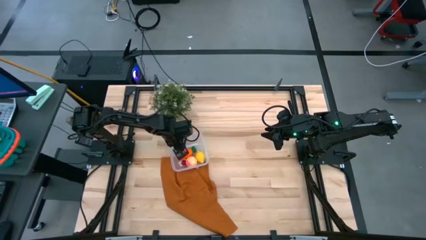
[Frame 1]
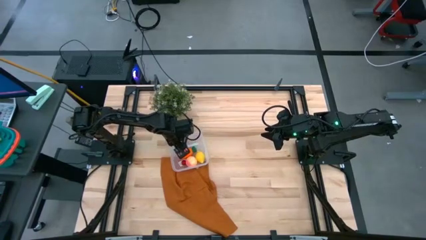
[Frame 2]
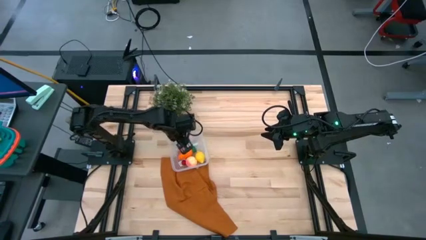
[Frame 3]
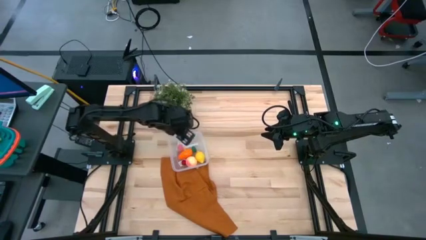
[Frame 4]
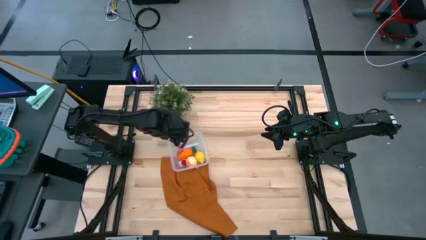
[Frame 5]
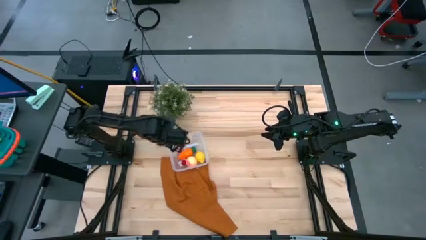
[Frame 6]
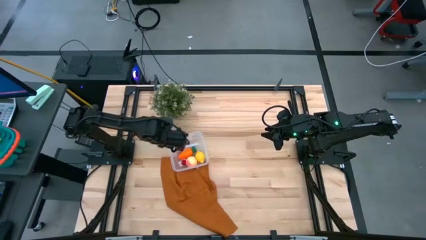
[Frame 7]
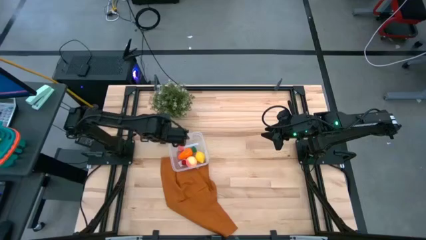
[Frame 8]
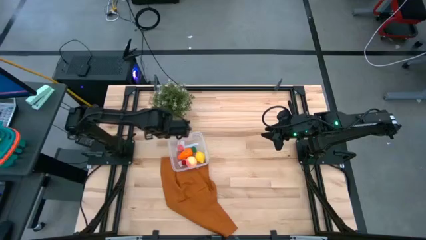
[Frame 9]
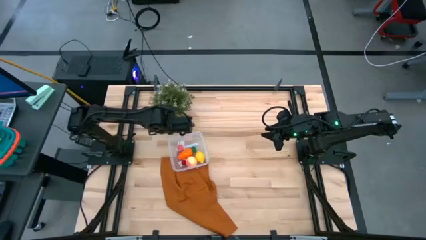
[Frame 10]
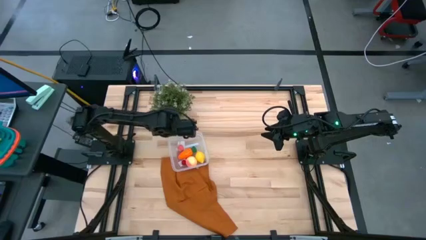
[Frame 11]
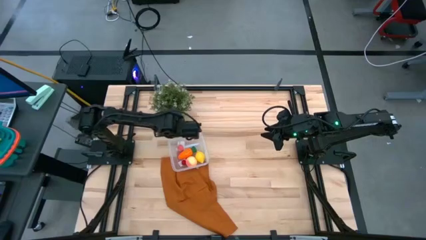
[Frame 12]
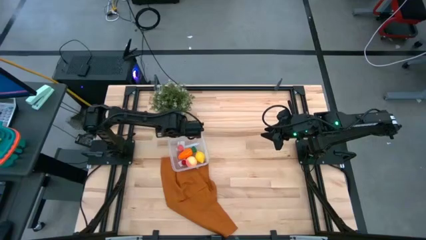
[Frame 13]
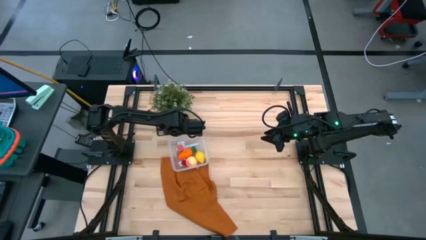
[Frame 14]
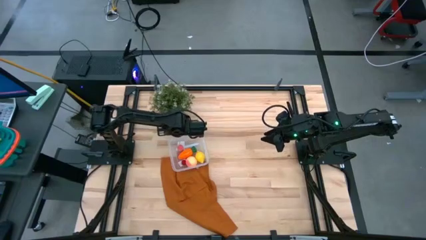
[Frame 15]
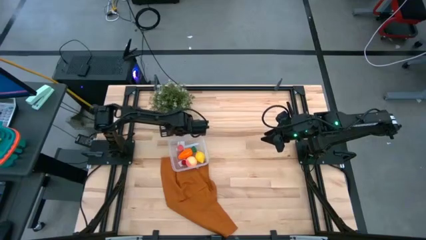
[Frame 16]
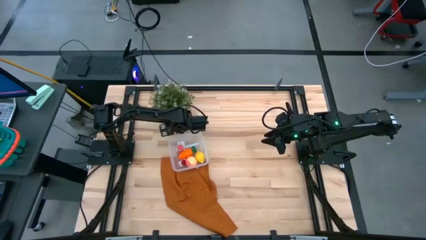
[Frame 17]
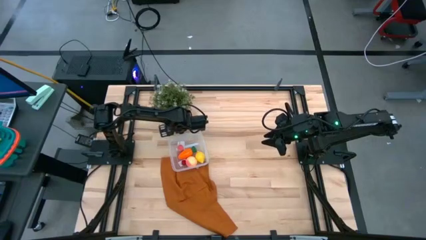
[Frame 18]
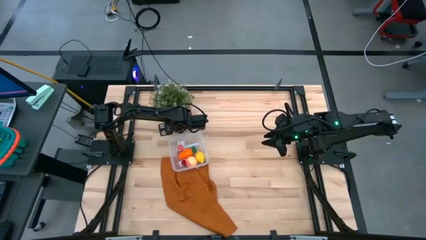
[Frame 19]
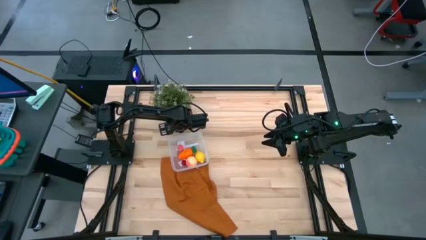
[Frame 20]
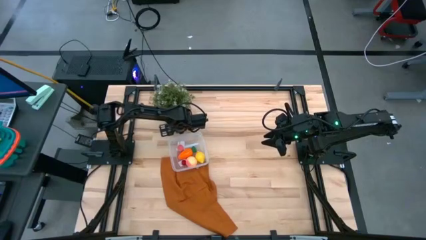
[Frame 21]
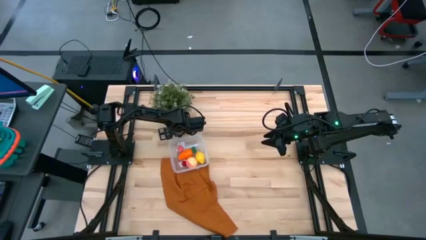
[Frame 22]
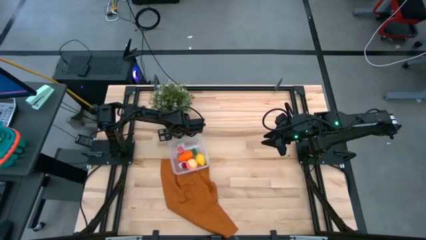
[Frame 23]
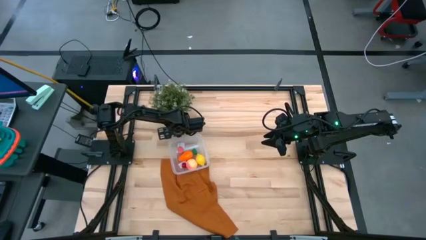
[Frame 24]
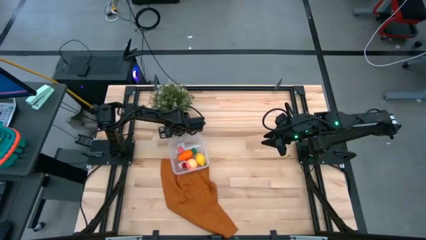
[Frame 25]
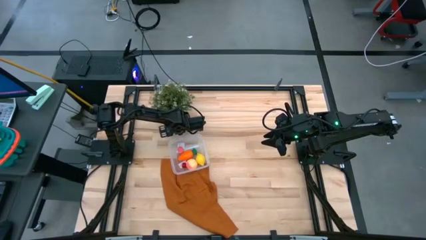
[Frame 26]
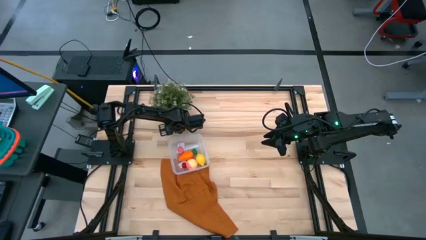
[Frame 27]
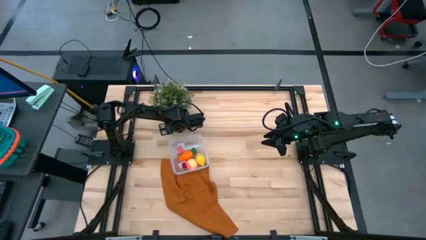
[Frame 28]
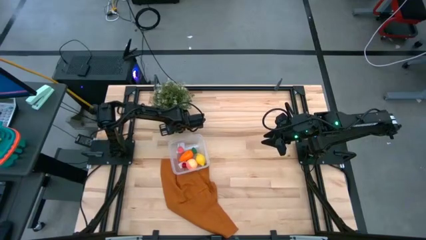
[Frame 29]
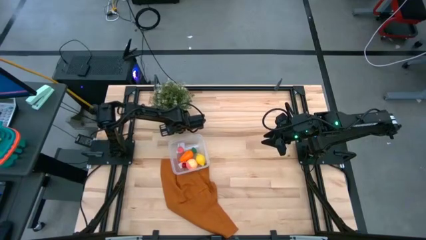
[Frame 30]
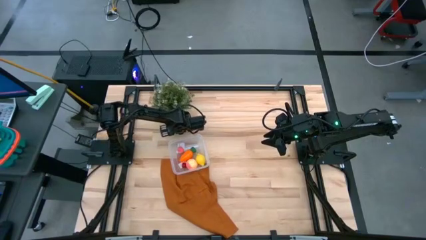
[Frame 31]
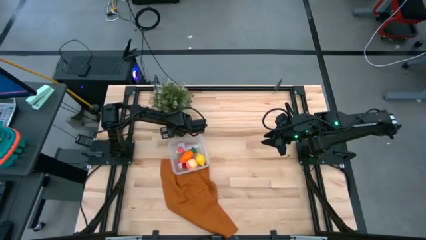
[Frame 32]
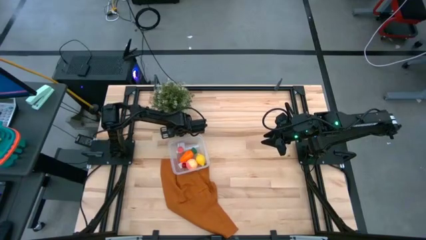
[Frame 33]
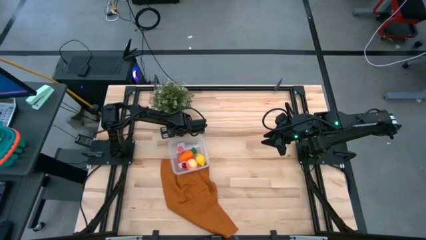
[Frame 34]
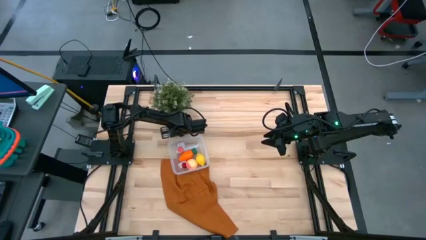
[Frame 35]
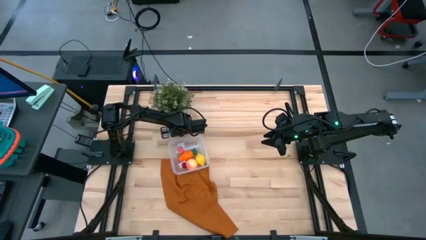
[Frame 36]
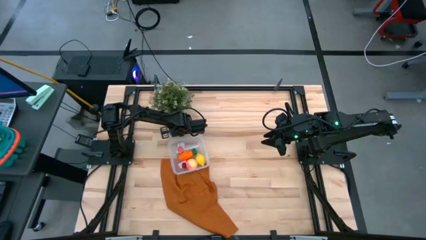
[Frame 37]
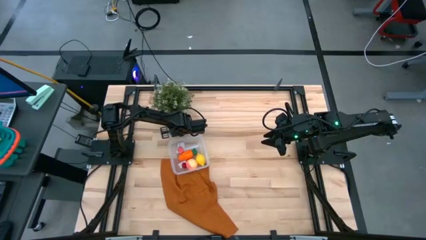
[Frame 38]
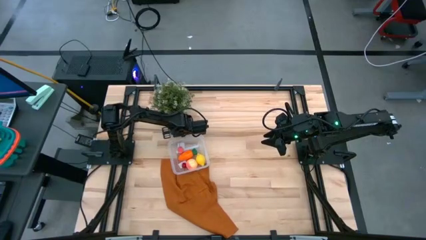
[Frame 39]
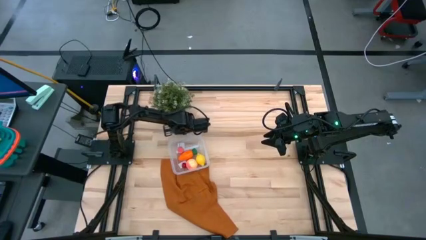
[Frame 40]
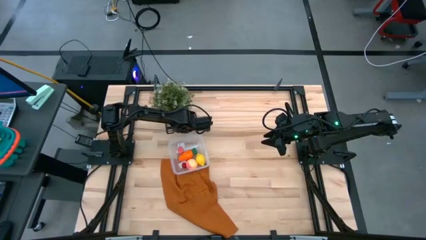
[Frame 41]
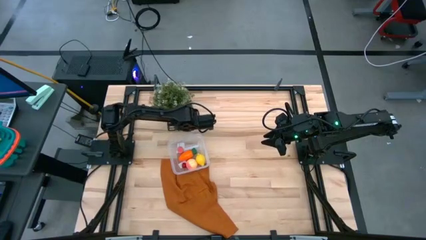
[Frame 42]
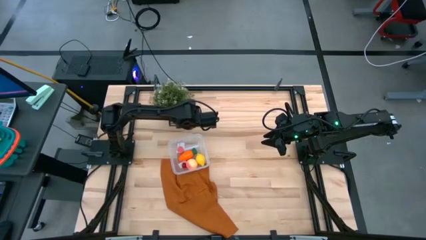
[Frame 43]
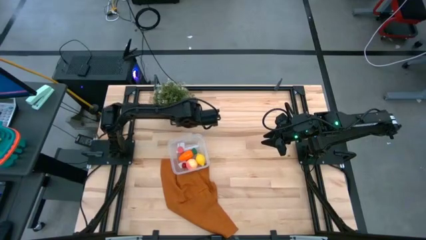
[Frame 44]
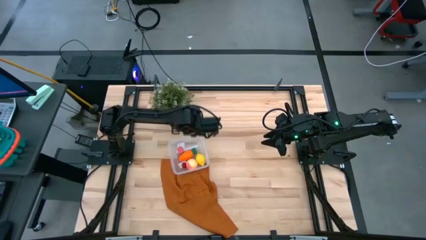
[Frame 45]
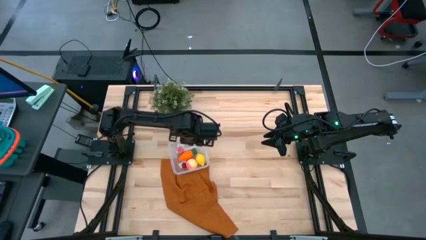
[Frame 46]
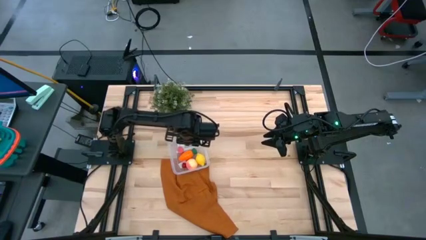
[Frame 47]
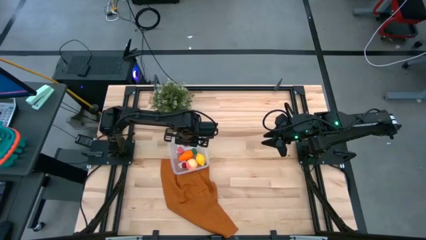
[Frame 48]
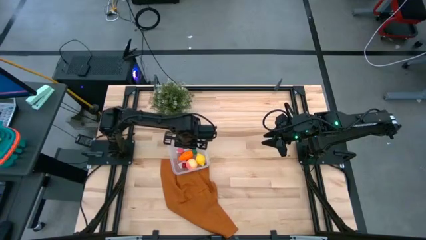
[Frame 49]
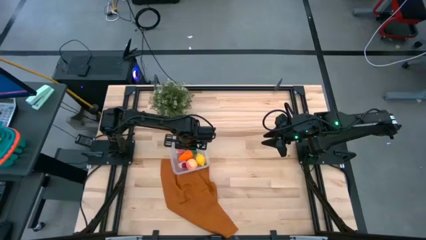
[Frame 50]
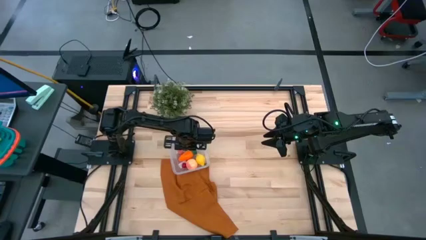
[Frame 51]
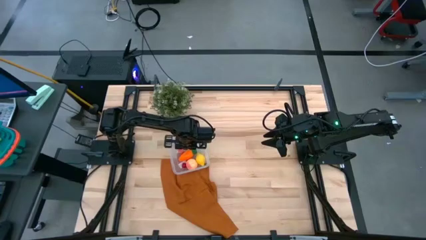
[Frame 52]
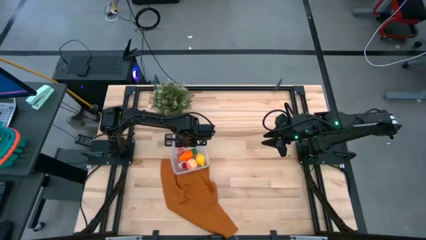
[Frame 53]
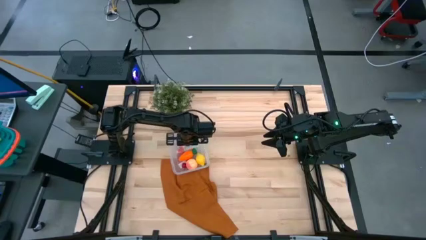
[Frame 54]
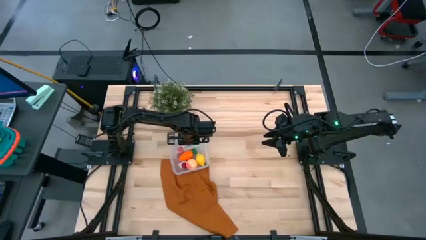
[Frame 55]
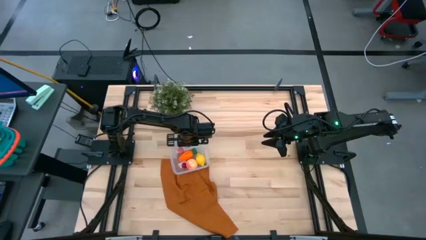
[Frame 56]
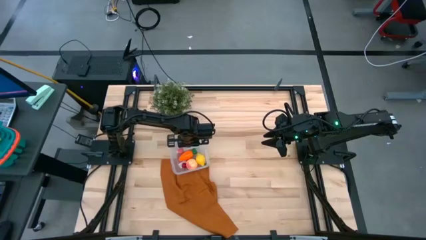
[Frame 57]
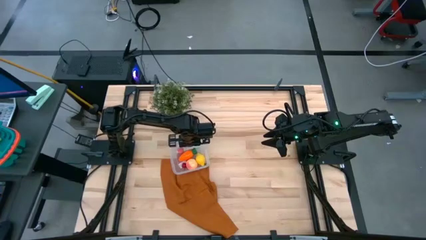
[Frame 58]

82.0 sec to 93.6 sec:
Task: Pick and placing Produce into tupperware
Put the black cherry into the bin

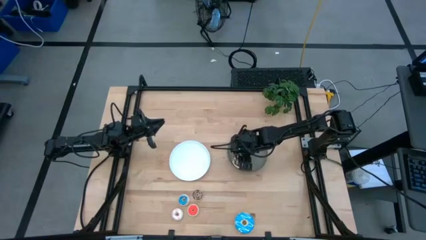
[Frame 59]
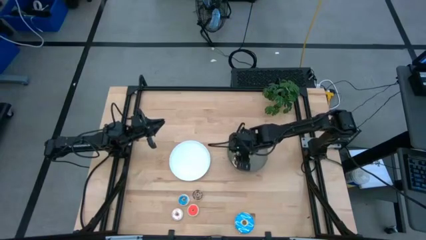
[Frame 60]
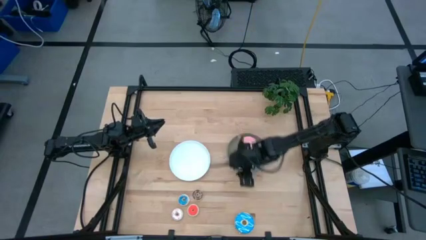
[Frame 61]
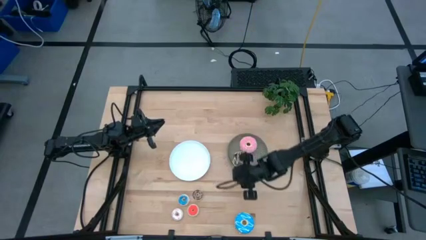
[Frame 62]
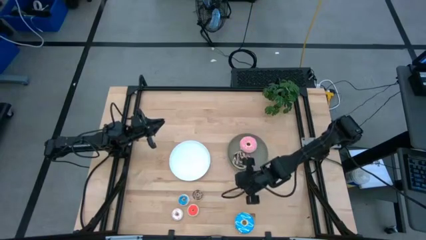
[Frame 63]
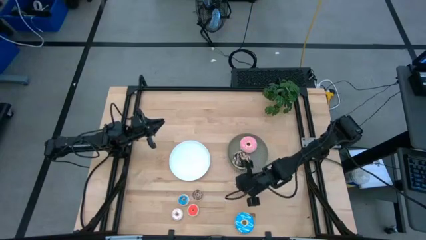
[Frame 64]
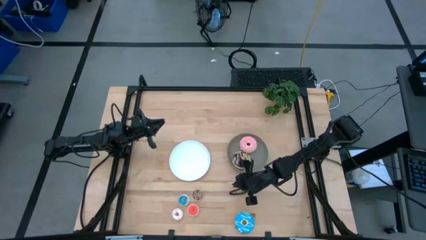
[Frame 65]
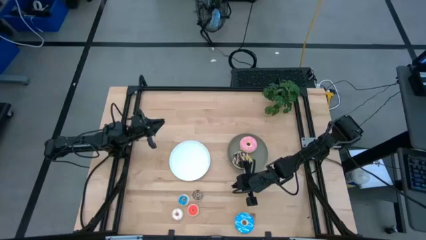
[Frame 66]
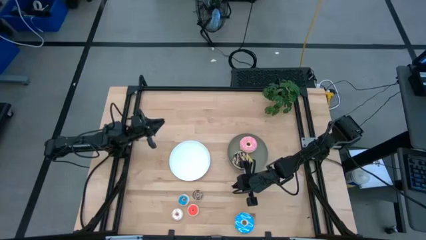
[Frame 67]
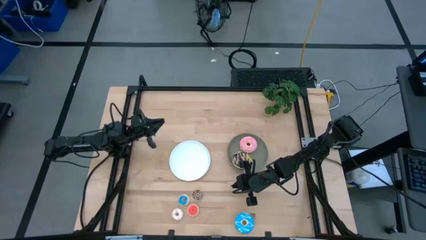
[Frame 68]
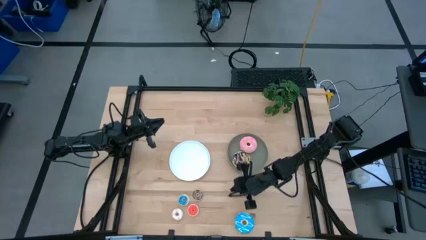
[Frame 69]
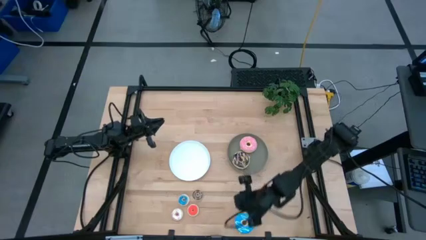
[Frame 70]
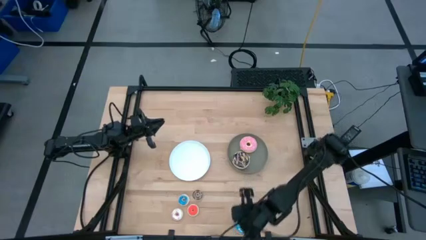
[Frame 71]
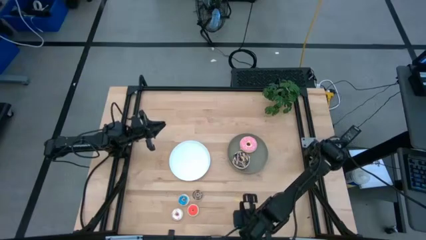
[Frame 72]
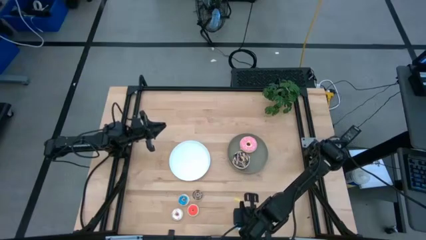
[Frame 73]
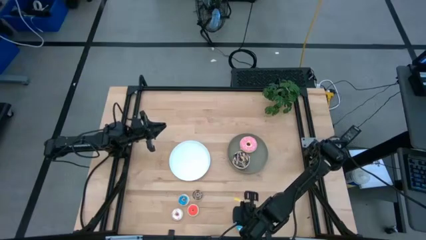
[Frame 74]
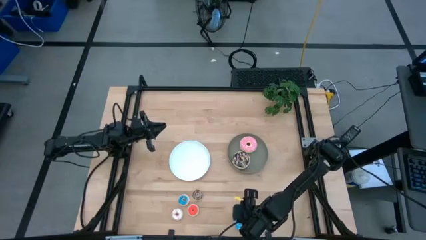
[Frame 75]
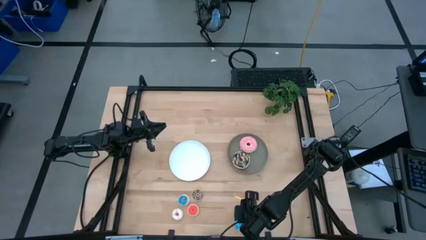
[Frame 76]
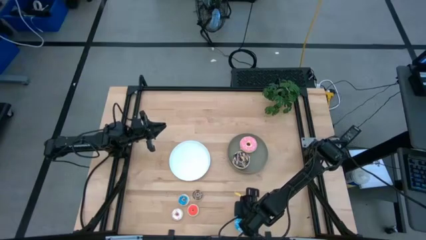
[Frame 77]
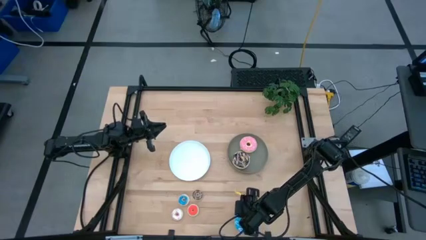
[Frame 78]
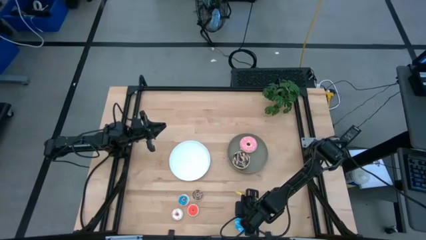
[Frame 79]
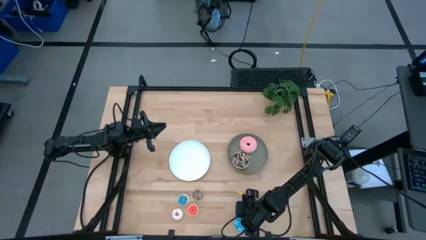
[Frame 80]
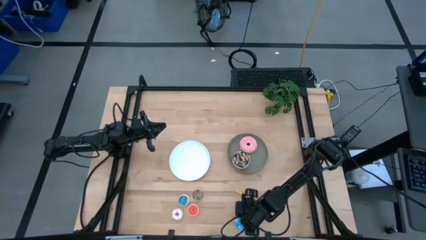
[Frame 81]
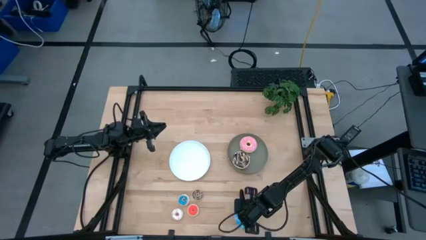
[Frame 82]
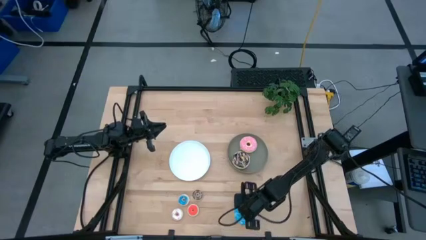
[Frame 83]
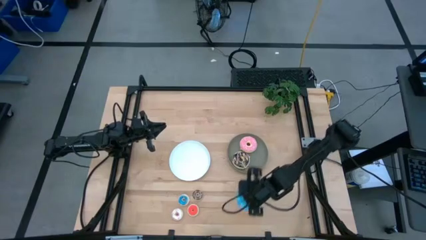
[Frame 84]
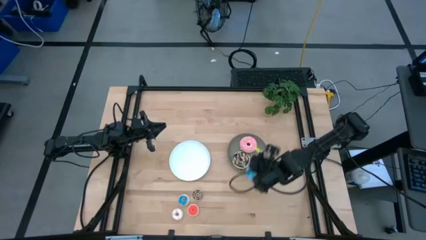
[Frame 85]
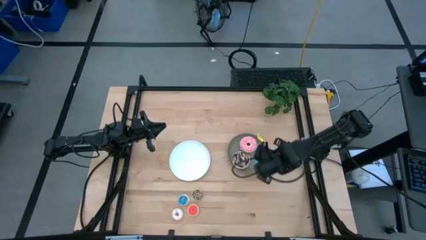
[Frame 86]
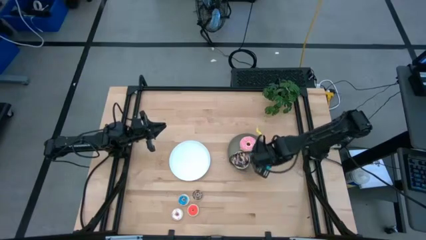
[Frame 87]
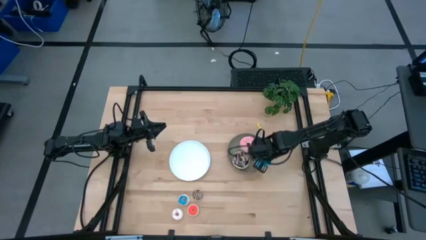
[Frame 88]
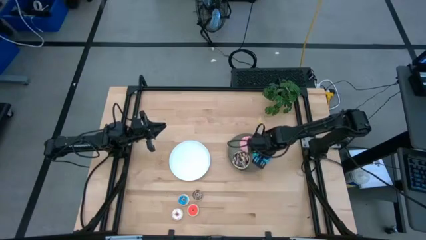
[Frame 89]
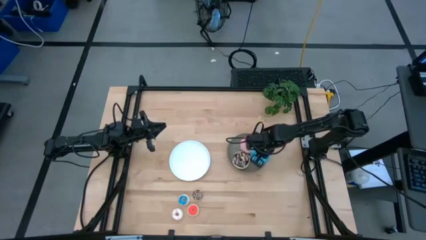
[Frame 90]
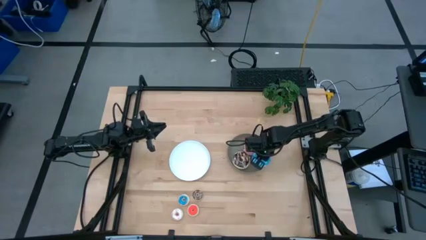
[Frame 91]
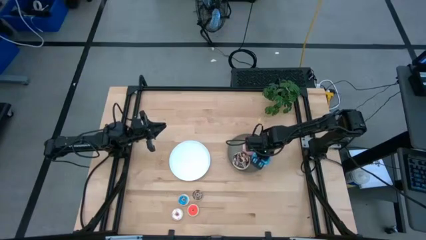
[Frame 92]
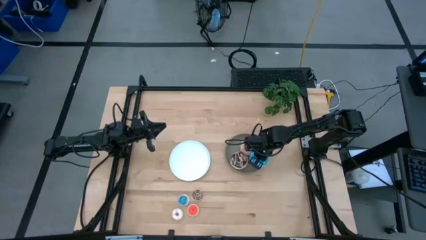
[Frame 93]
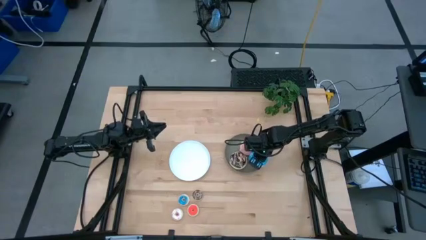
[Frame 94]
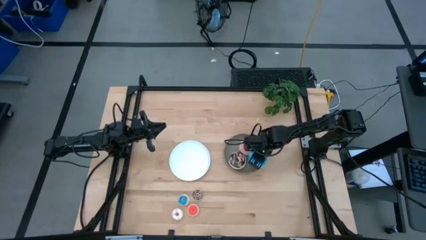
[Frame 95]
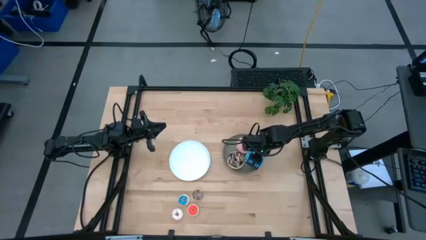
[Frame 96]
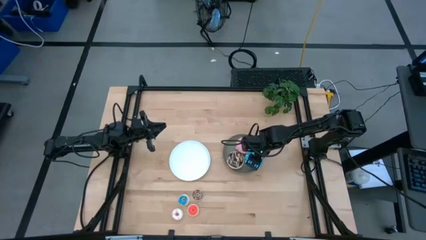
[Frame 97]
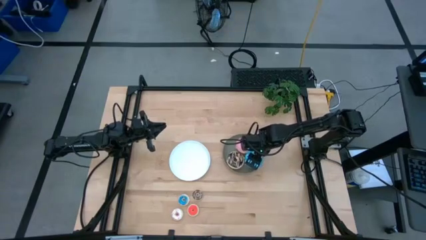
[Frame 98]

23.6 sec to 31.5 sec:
Task: Pick & Place donuts
Put the large blue donut on the gray plate
